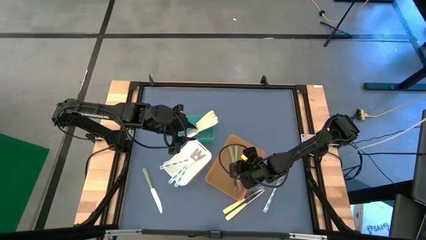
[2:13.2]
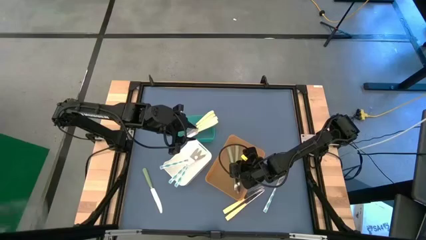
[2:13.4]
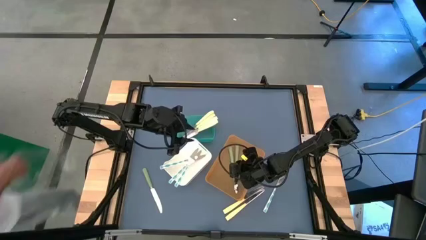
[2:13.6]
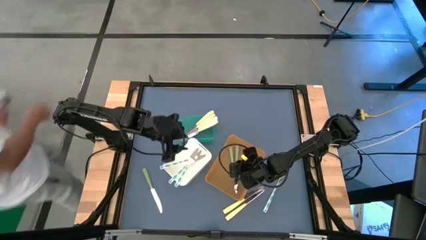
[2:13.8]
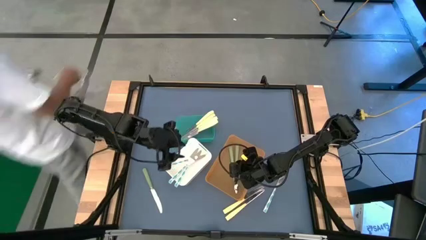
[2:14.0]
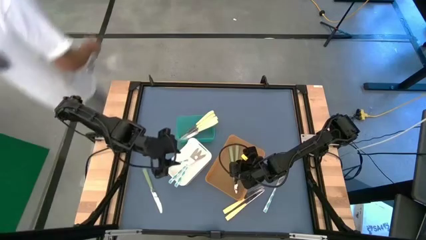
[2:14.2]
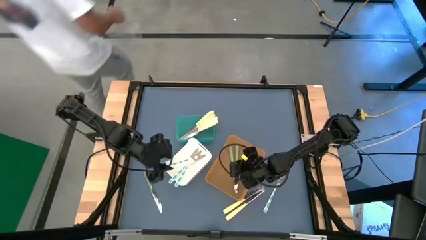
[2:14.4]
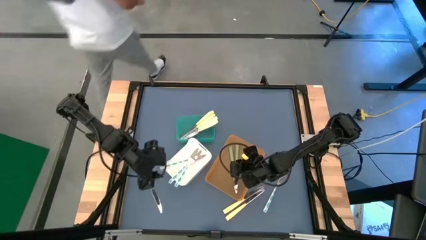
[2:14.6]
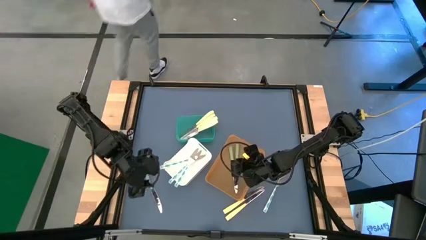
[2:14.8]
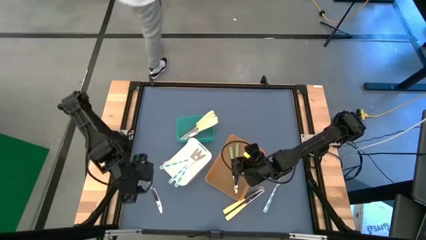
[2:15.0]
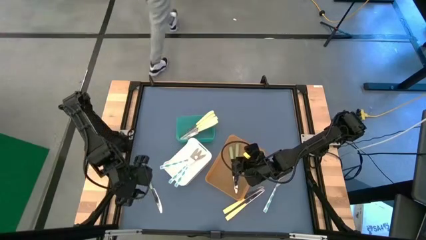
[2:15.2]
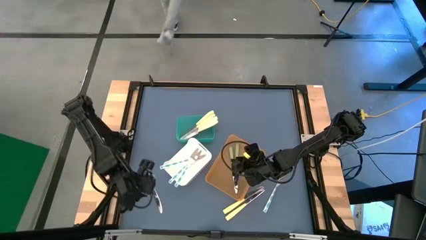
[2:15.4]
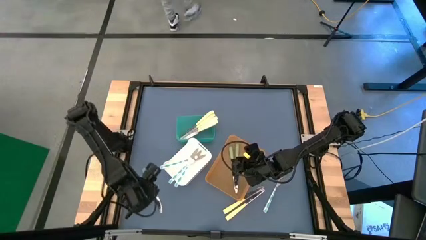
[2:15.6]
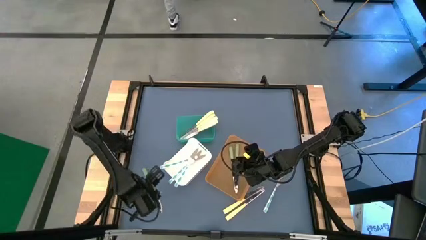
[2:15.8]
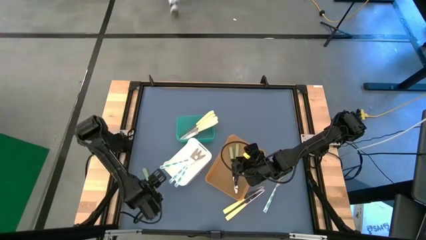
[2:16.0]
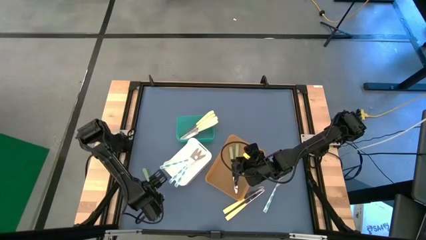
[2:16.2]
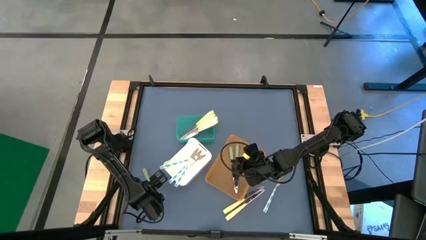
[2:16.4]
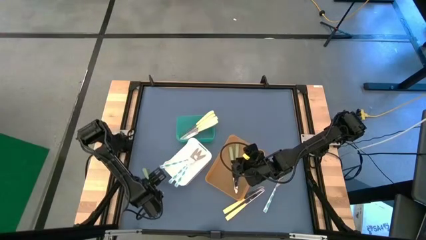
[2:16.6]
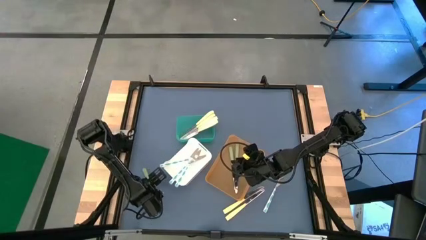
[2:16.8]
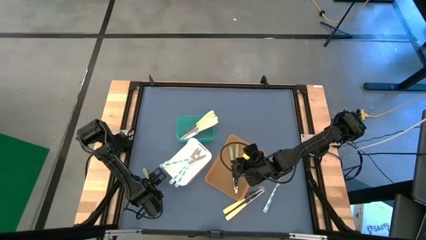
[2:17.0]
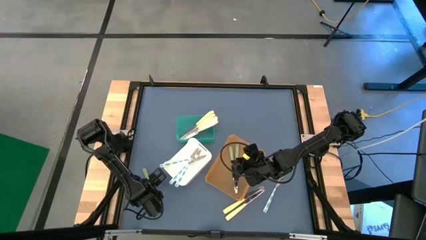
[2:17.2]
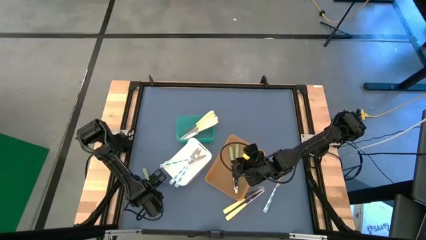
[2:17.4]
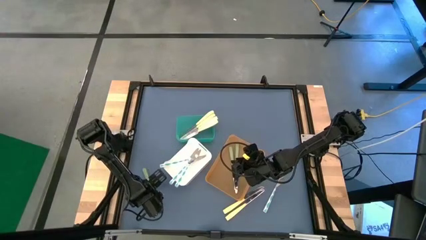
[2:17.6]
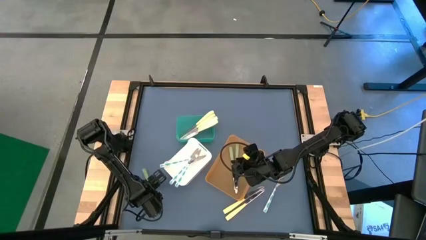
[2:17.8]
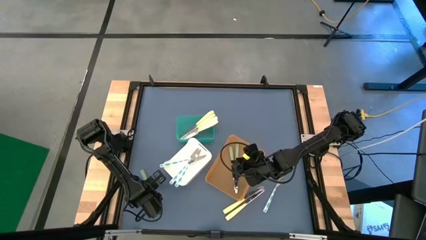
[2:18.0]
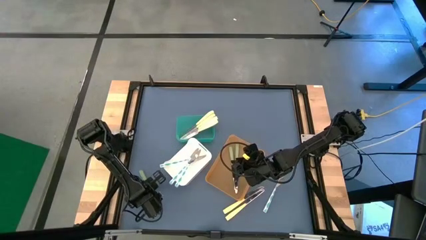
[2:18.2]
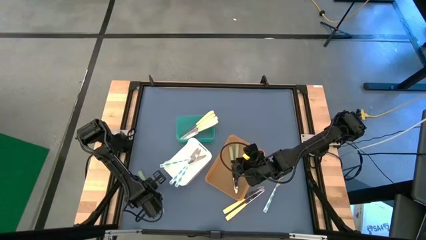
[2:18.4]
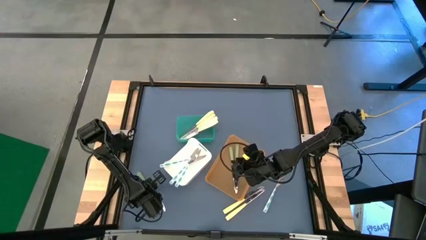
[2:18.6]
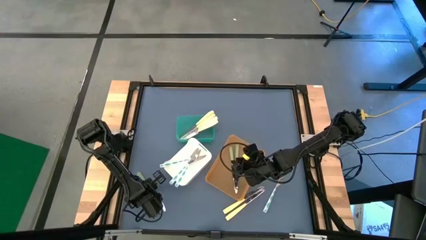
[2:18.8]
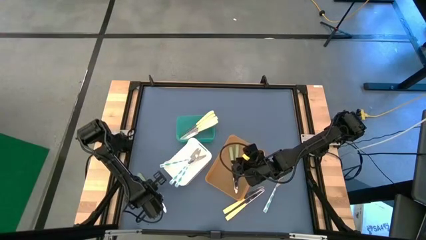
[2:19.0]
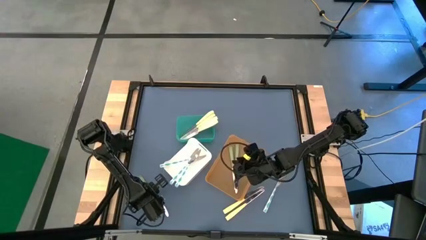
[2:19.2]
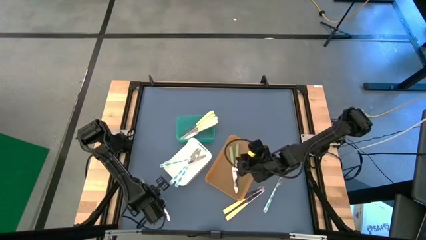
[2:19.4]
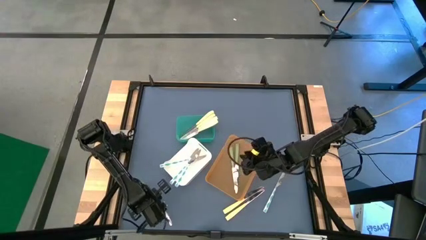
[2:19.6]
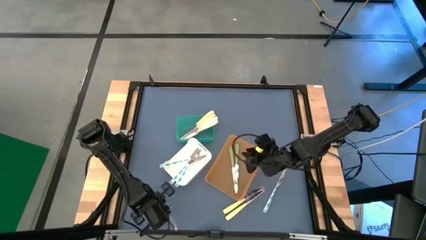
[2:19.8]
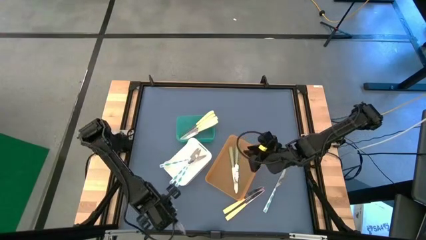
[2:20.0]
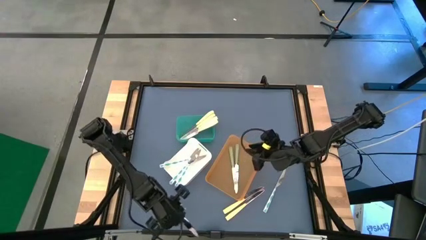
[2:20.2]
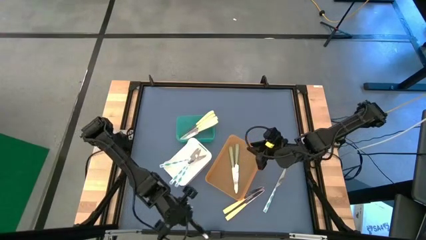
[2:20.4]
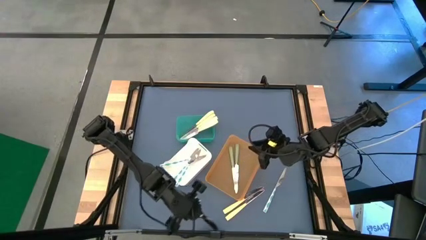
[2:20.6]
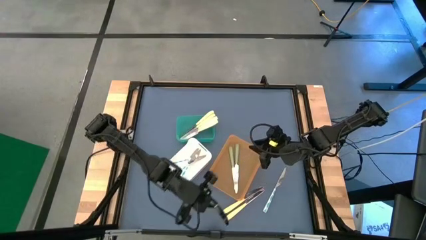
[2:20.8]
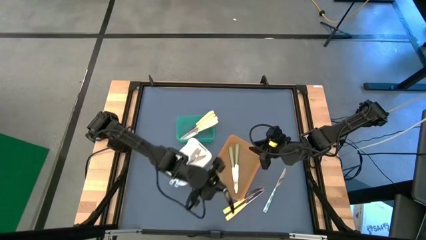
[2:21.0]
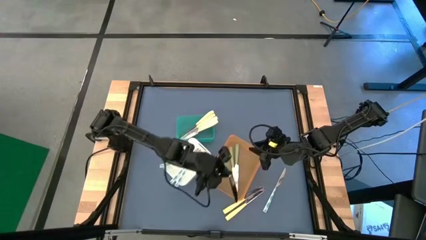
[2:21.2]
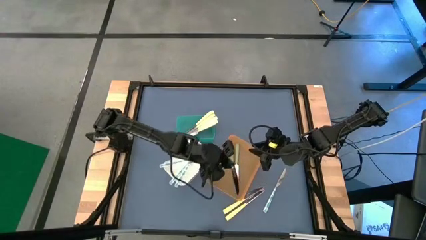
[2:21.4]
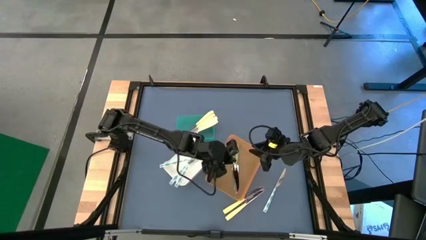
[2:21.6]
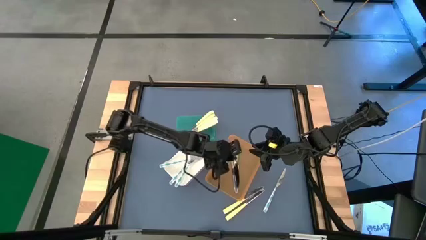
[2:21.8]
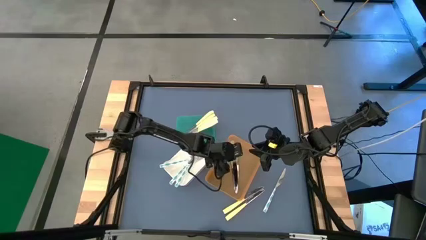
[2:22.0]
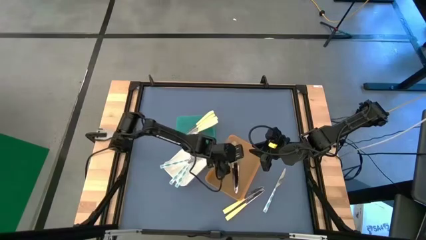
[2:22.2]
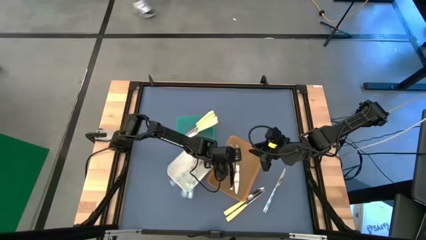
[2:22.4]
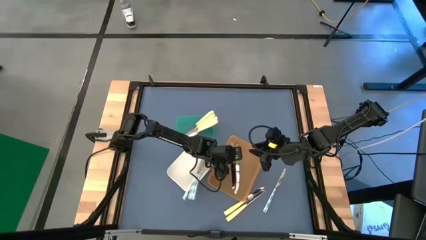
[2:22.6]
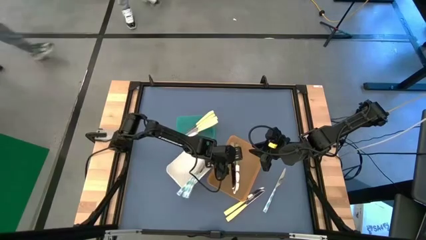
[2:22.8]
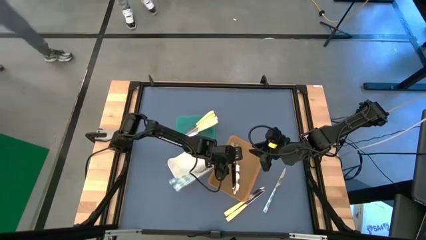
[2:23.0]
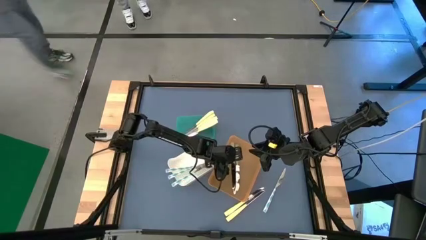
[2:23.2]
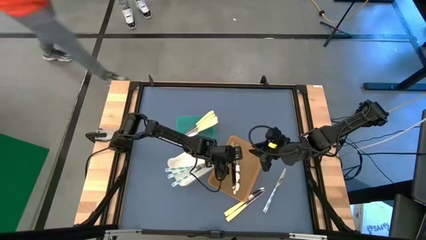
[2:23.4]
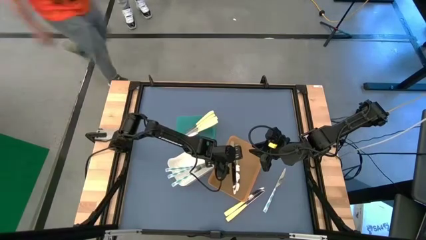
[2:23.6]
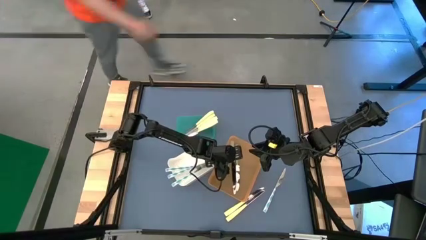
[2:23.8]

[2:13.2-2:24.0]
Task: Sort silverware by color (type)
Put the green knife into the orange bin
